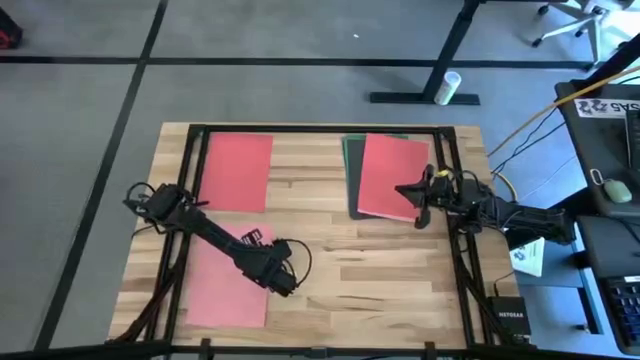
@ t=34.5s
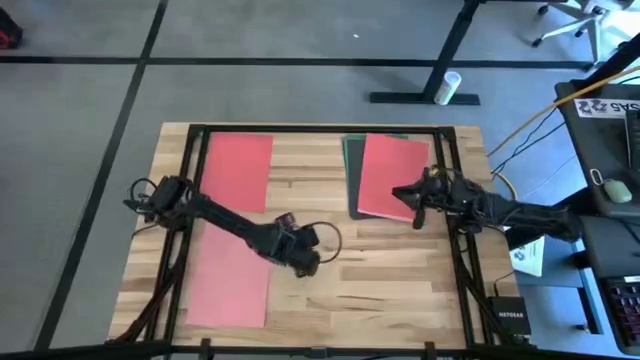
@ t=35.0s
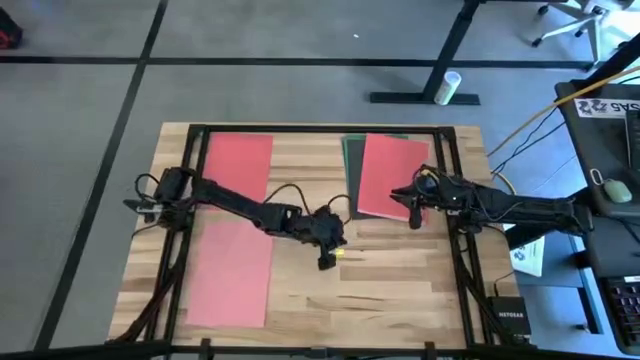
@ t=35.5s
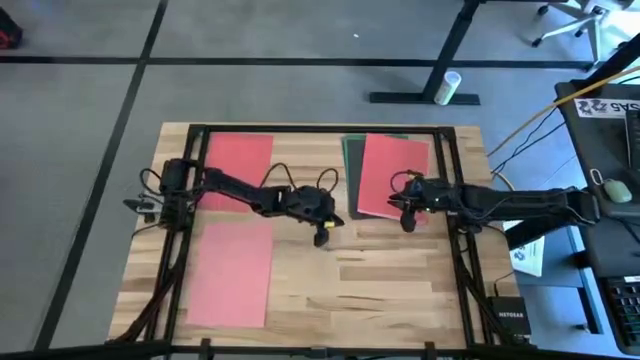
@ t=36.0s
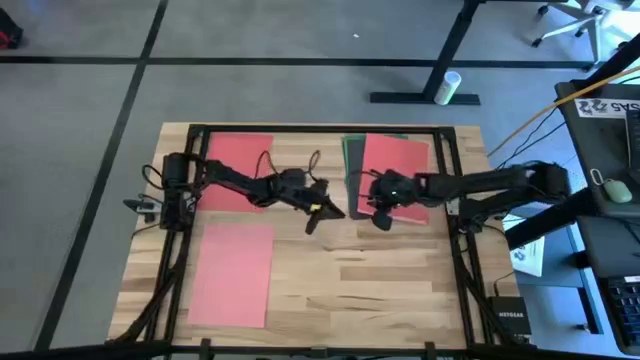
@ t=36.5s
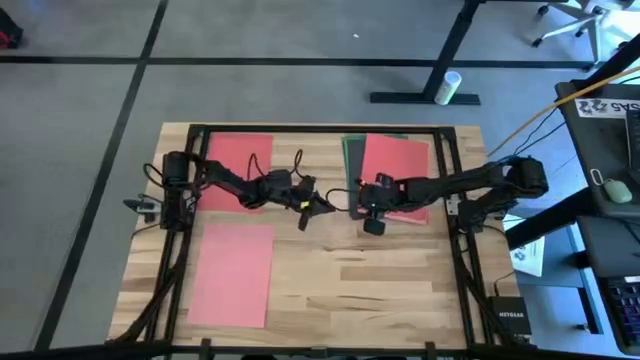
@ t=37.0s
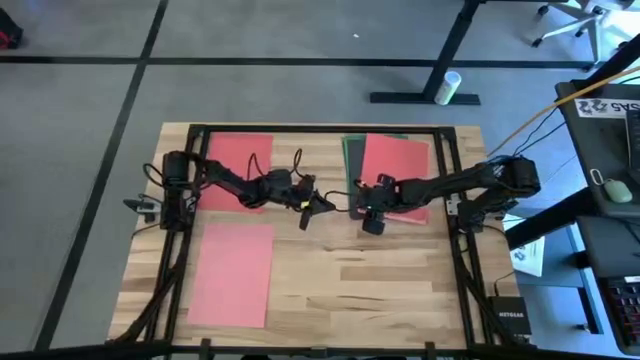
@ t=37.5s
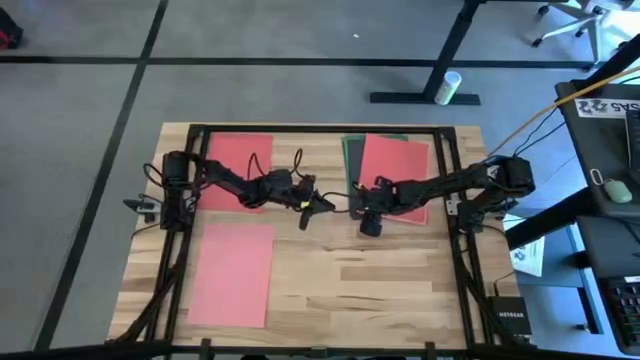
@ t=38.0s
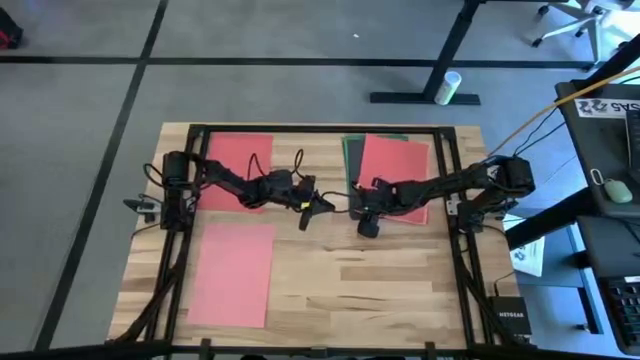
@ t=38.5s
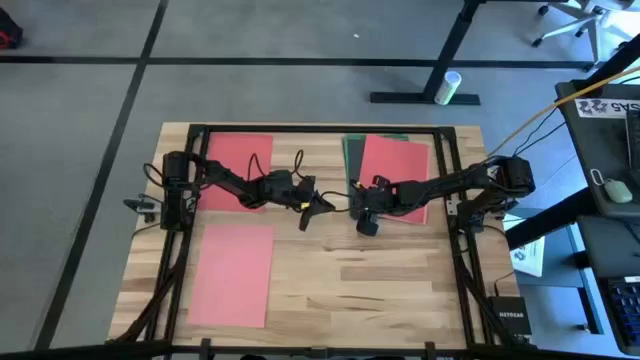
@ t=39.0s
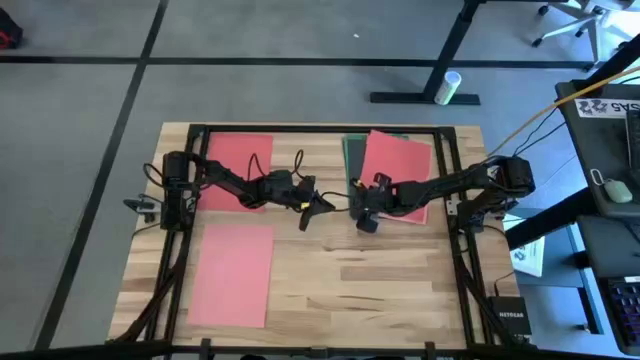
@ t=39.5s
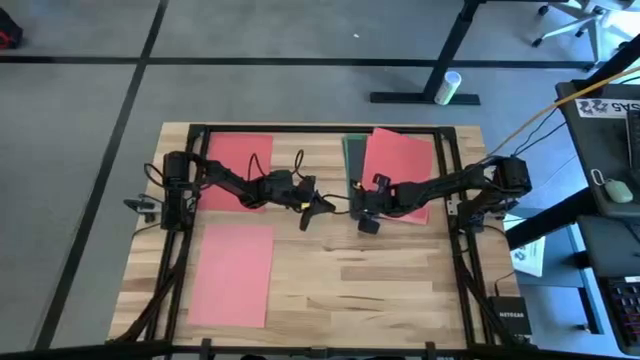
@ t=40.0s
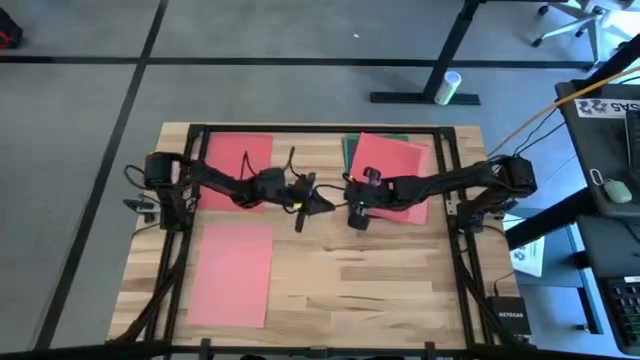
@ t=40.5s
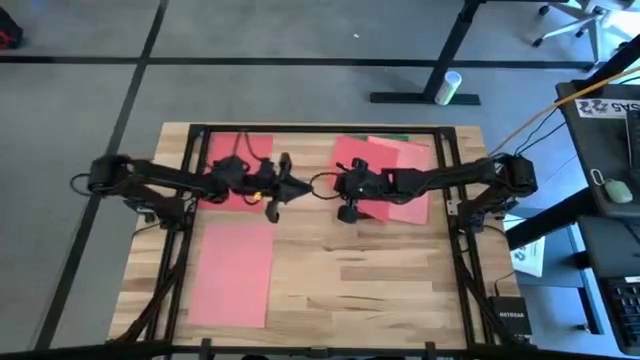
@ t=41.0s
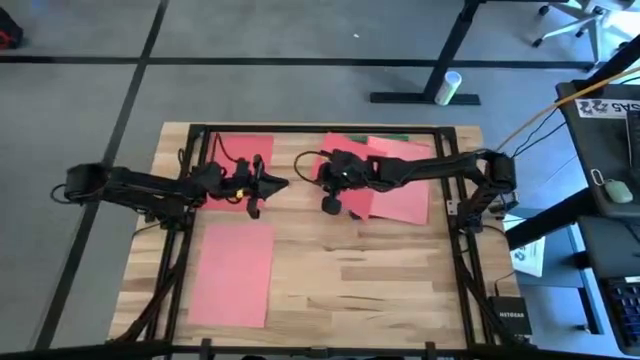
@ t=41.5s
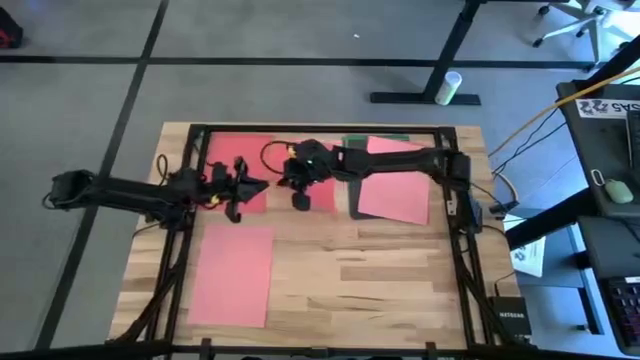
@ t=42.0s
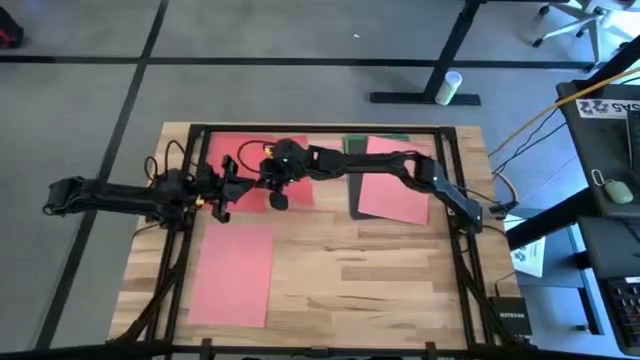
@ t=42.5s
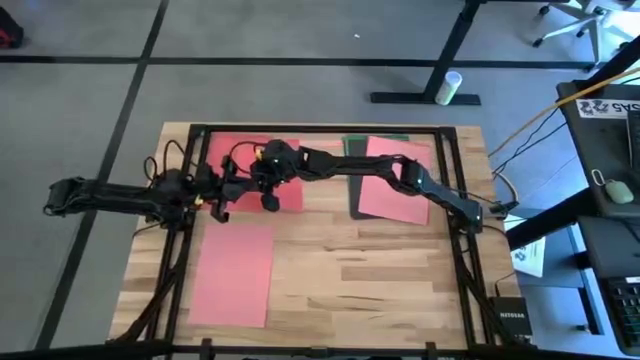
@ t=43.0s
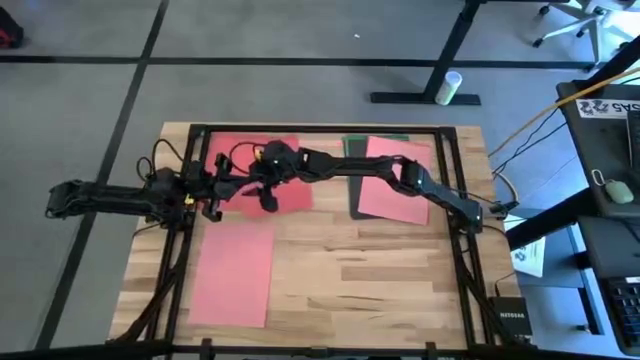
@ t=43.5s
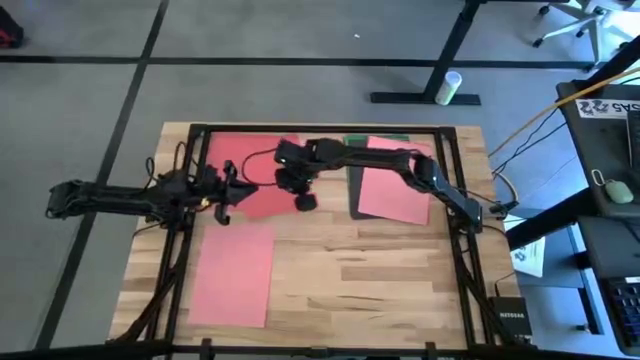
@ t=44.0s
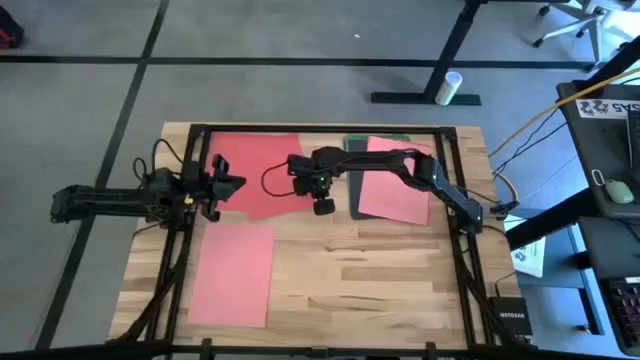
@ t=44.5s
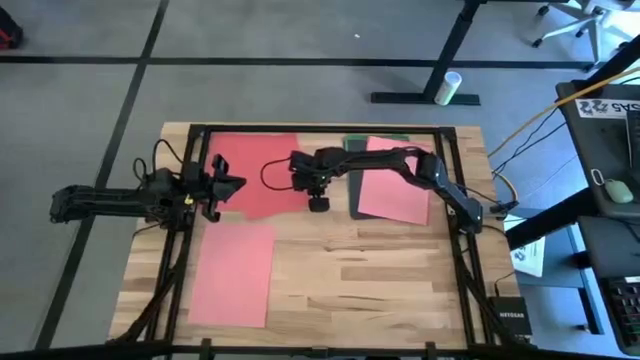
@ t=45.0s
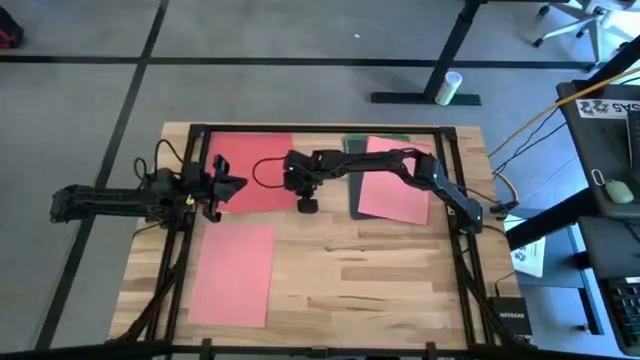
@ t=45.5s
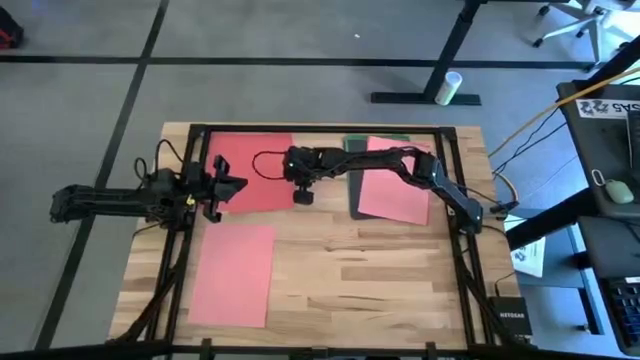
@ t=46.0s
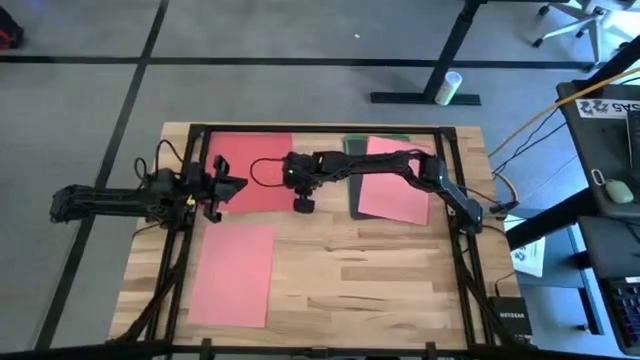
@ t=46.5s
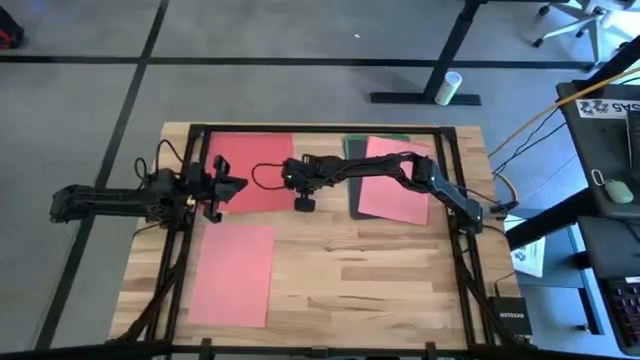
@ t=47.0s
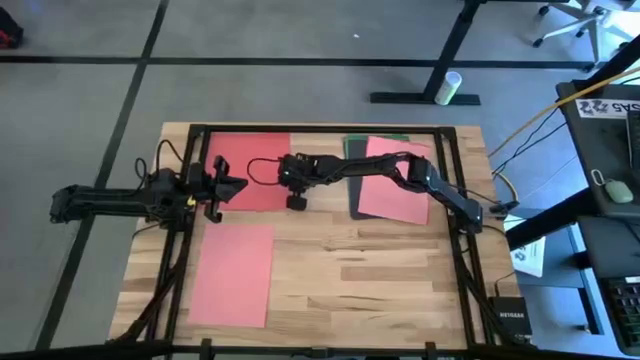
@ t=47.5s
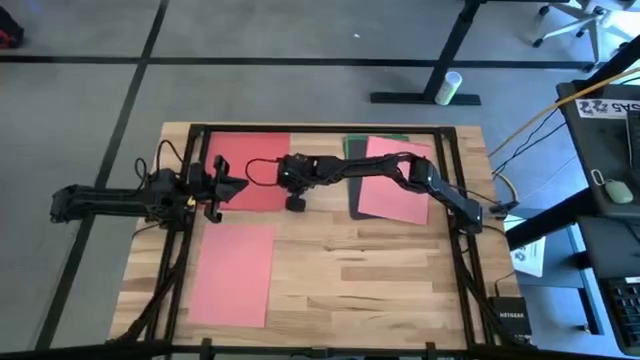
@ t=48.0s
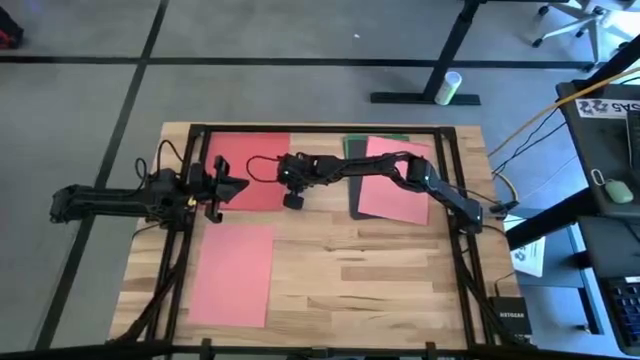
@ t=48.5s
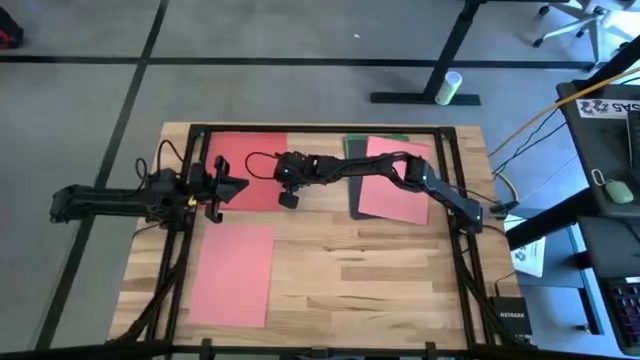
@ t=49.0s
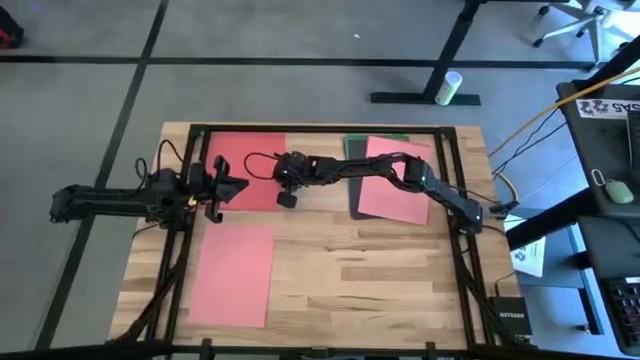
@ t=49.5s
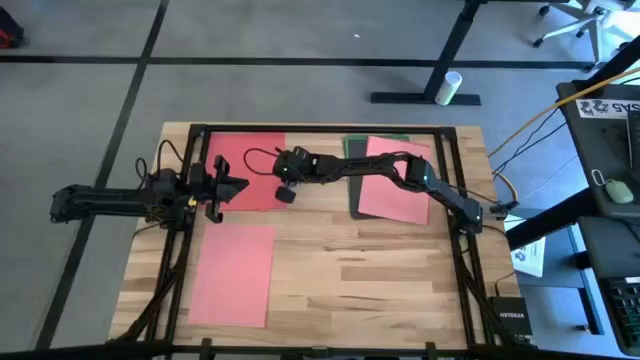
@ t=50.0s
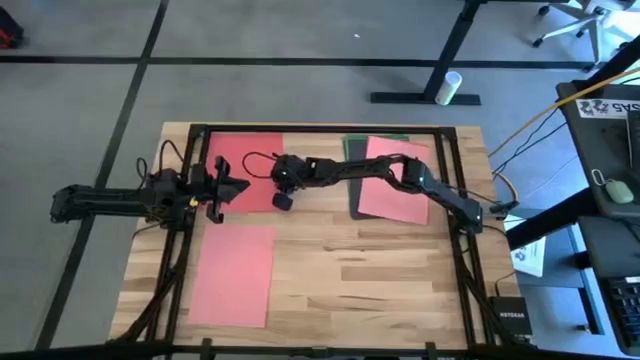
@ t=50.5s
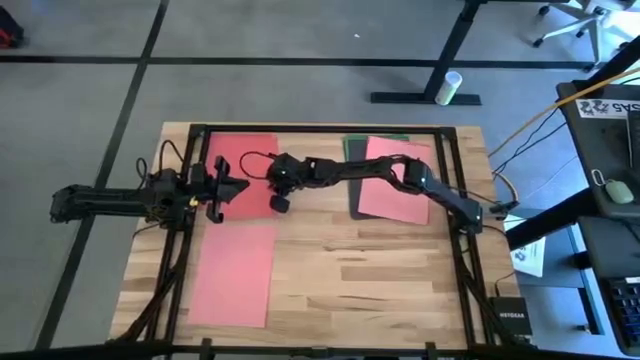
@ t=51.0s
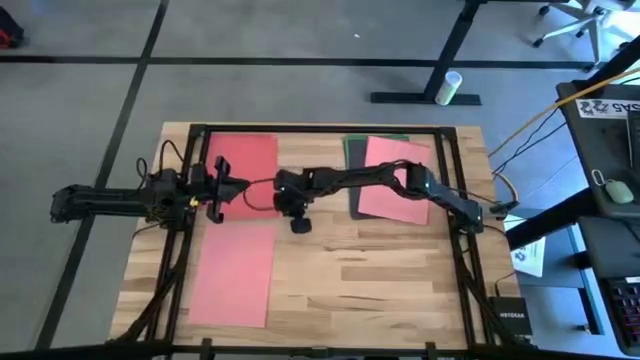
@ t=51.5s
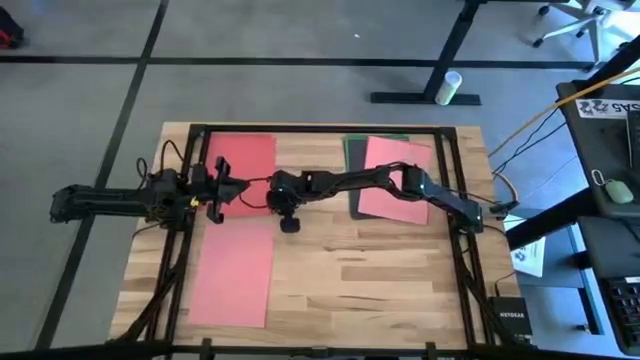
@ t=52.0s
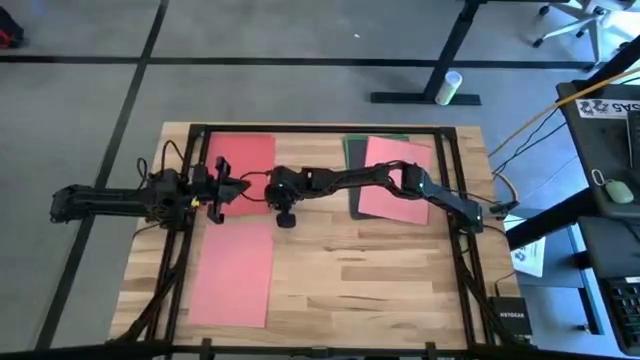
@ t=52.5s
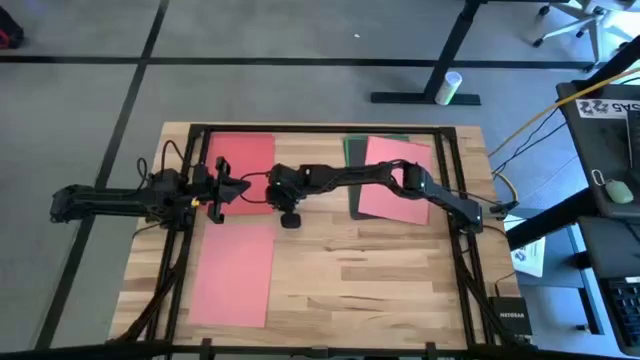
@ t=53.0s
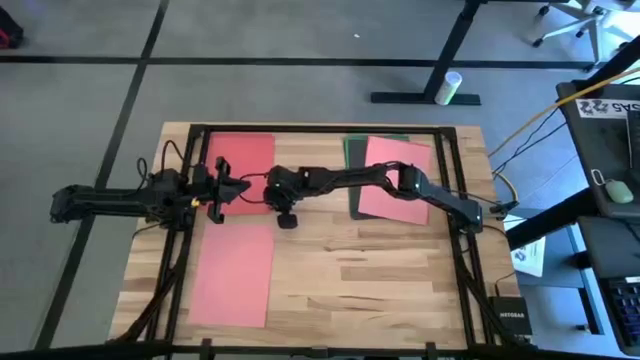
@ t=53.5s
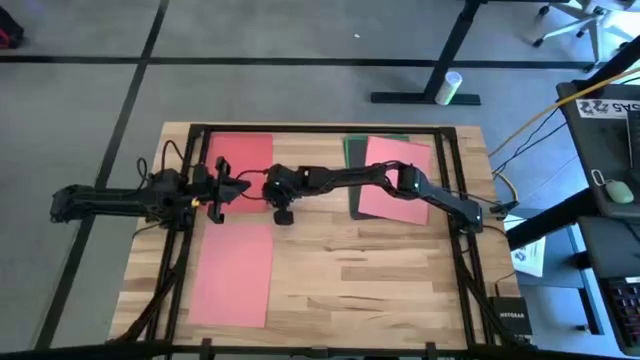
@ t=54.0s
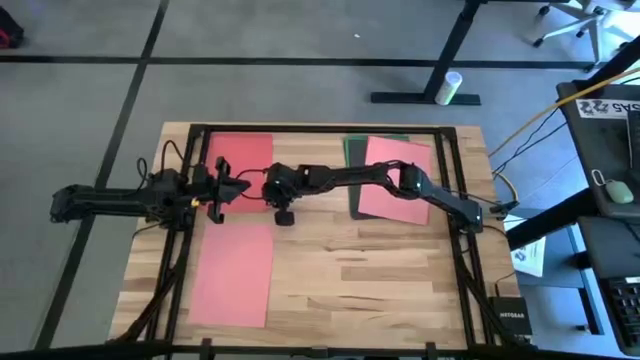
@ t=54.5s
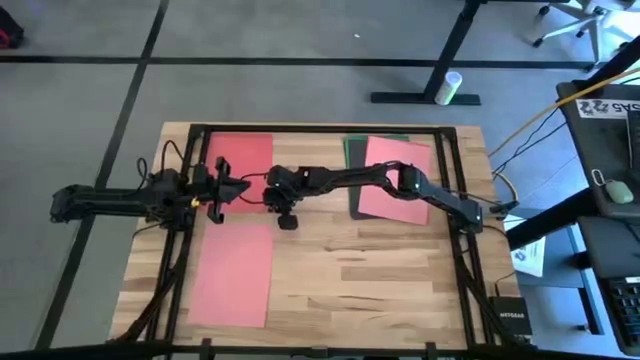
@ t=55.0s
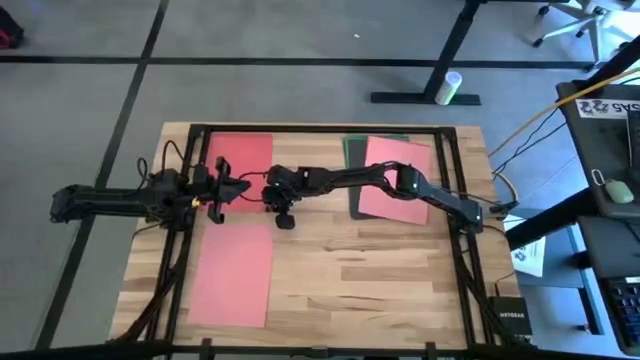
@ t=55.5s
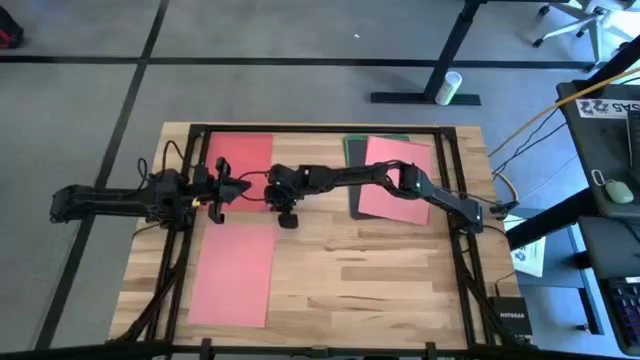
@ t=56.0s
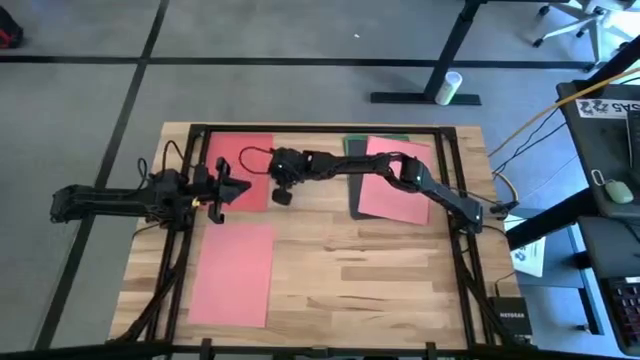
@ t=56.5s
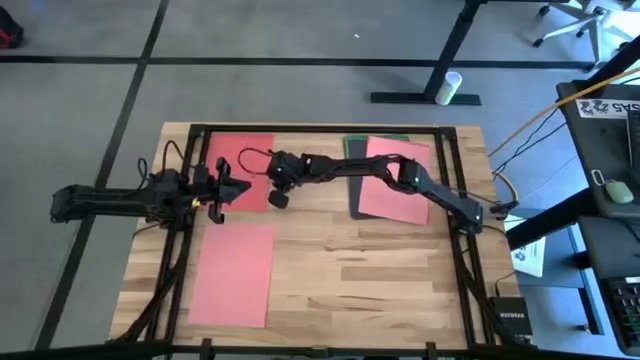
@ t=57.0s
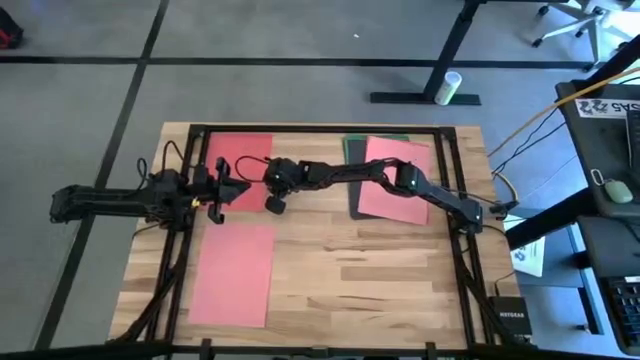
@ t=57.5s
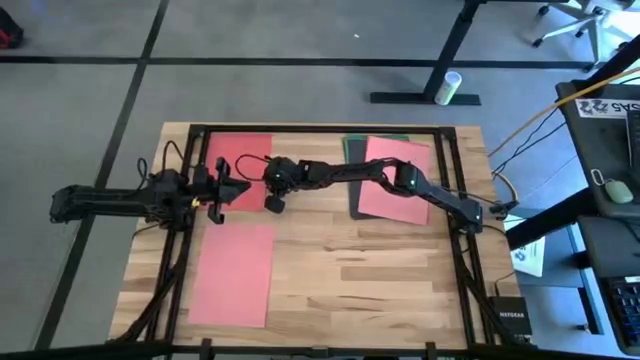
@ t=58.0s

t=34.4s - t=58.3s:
Task: Organize paper
Stack the red paper on top of the red paper
